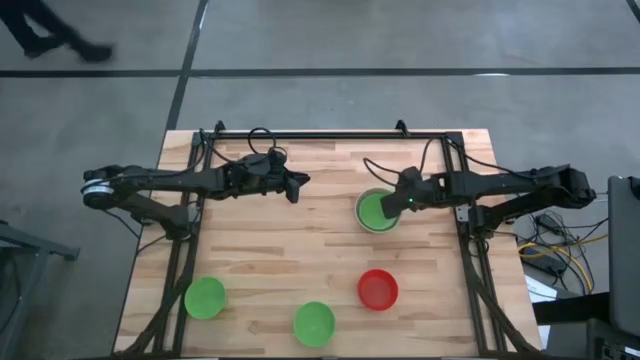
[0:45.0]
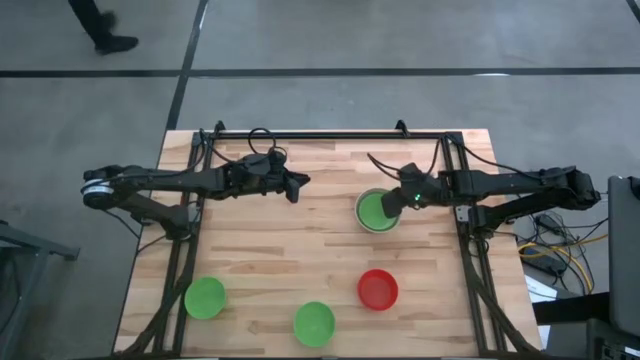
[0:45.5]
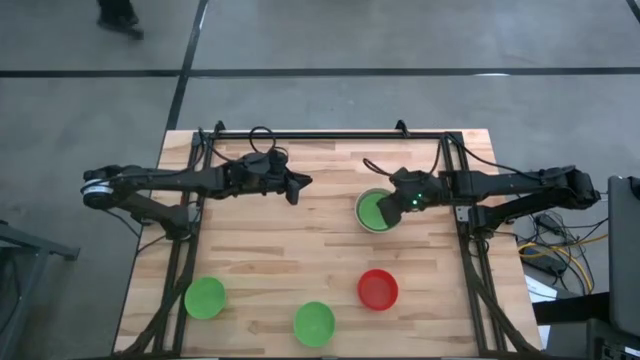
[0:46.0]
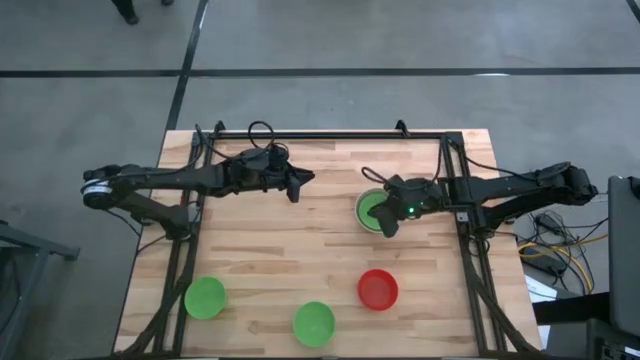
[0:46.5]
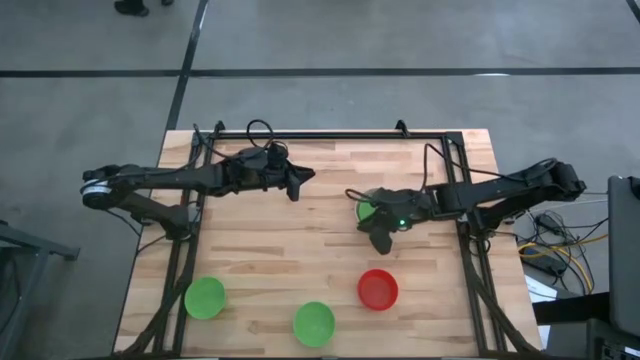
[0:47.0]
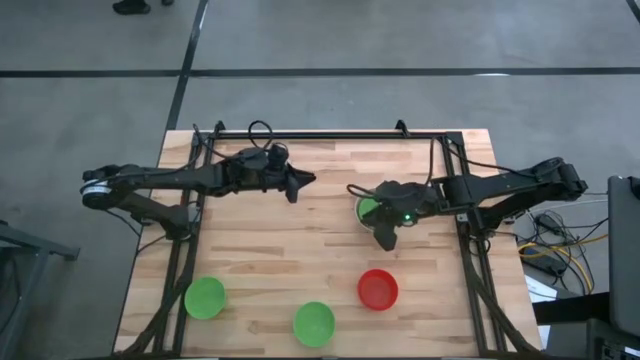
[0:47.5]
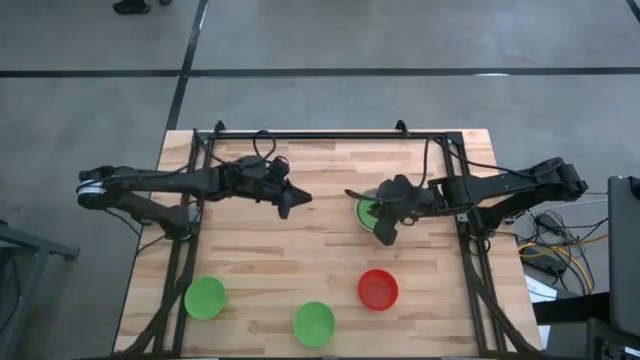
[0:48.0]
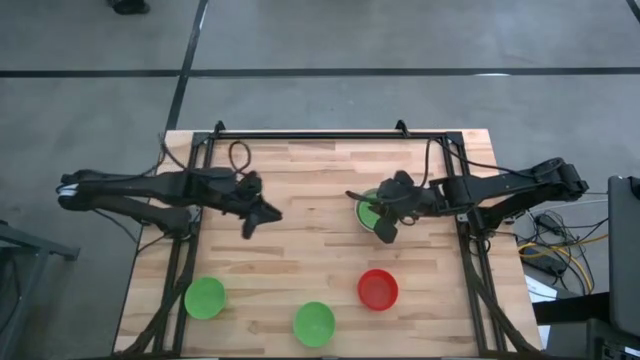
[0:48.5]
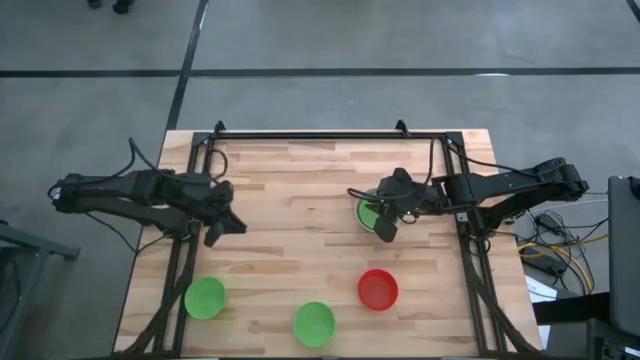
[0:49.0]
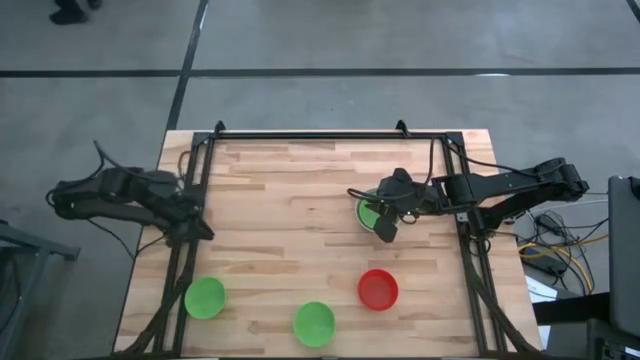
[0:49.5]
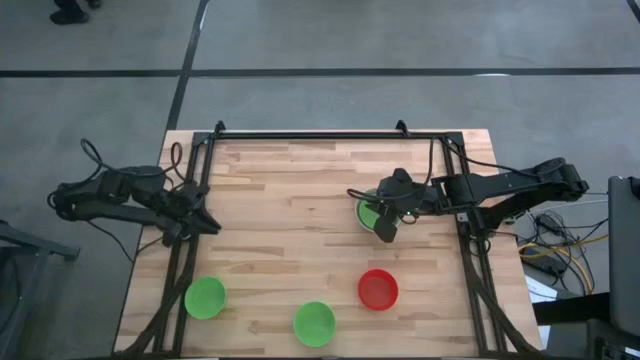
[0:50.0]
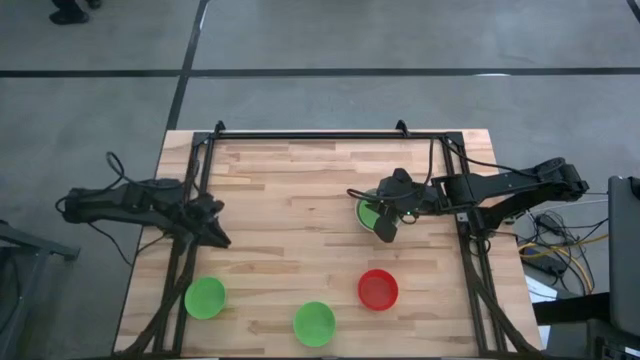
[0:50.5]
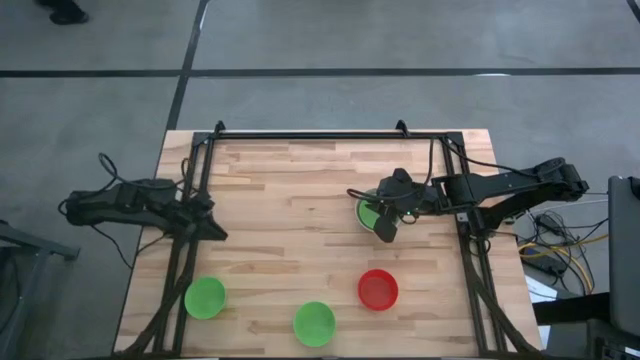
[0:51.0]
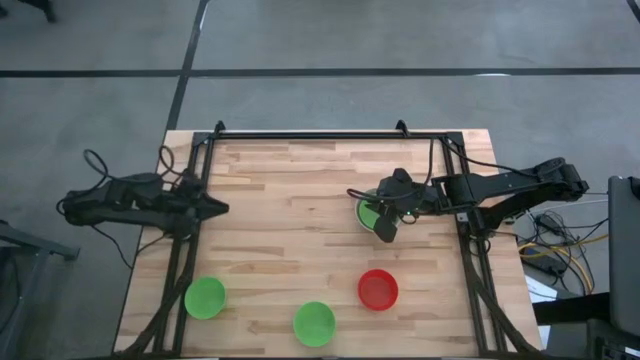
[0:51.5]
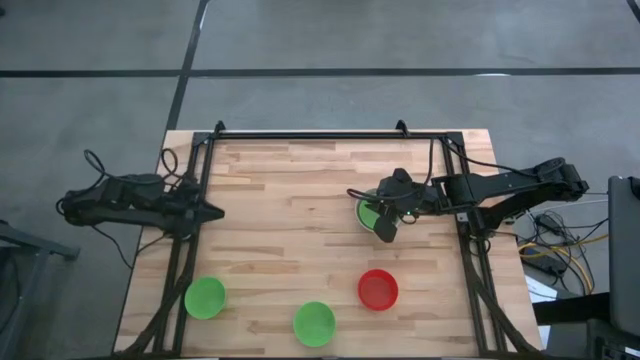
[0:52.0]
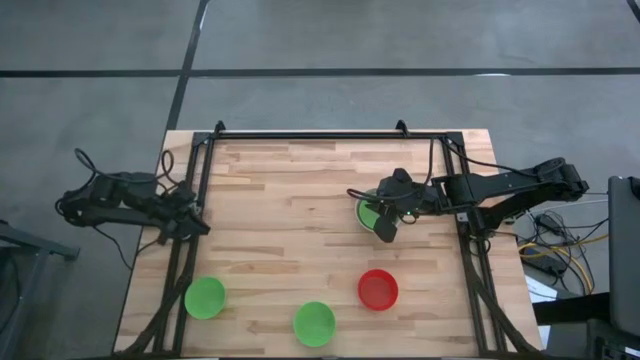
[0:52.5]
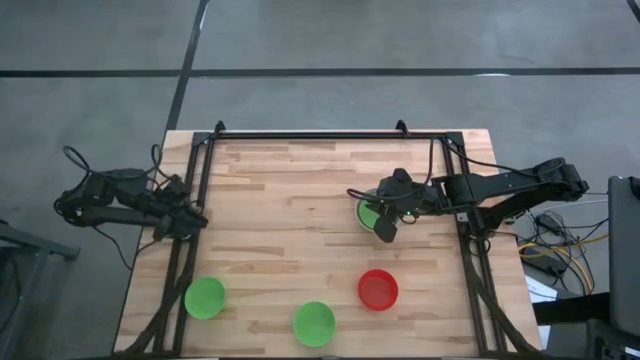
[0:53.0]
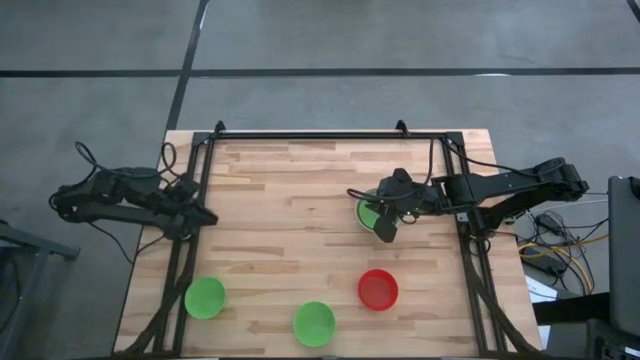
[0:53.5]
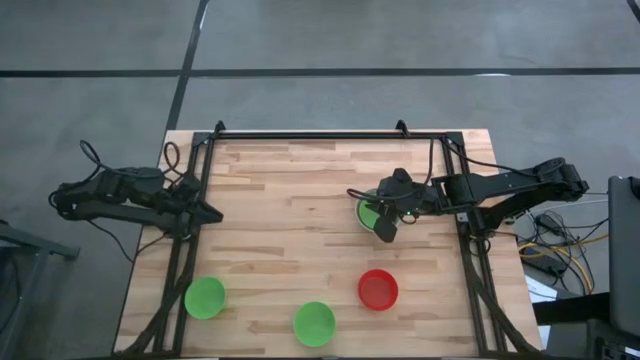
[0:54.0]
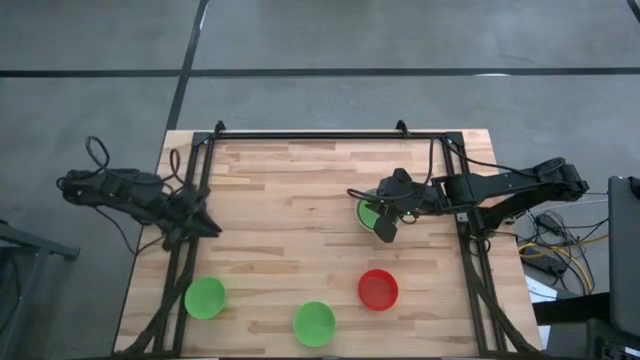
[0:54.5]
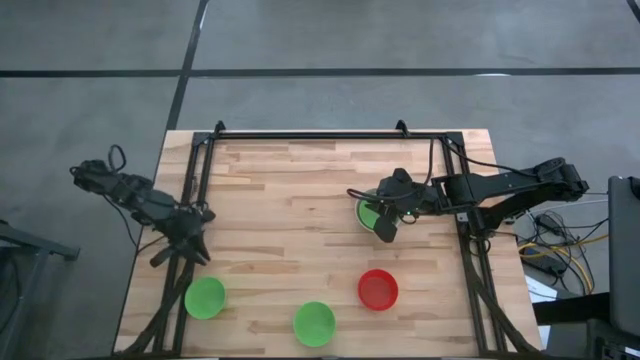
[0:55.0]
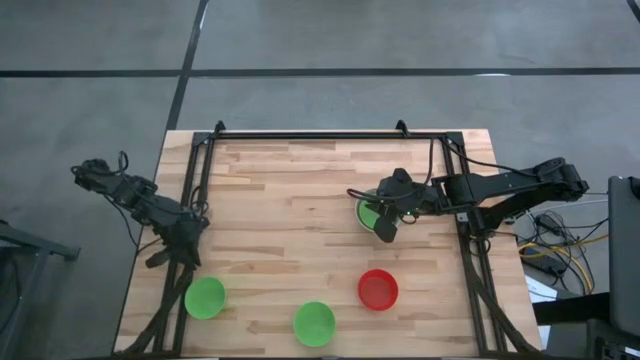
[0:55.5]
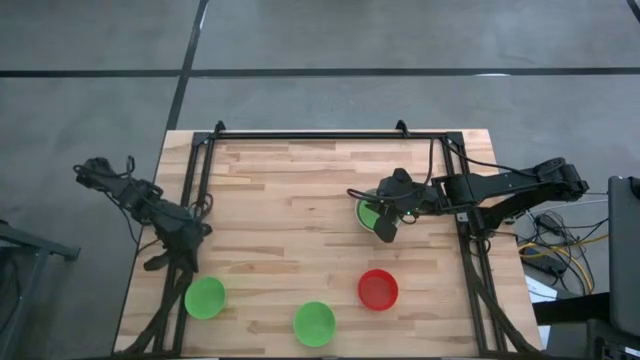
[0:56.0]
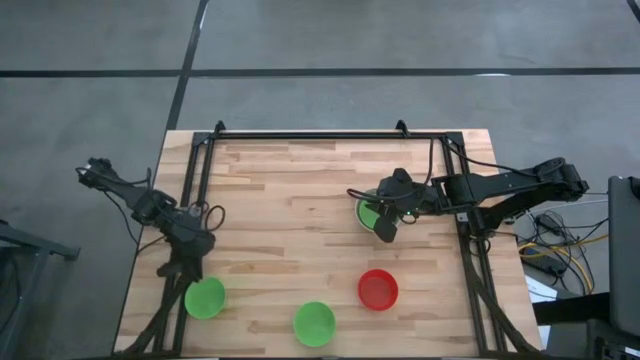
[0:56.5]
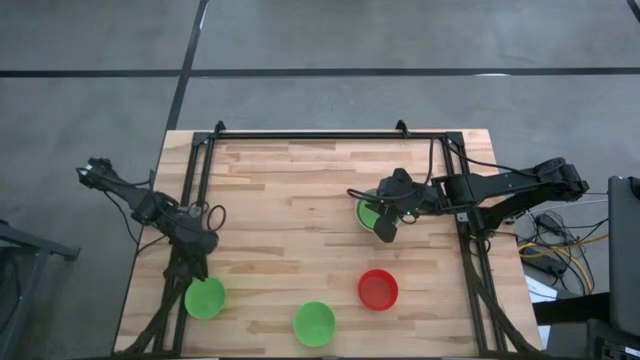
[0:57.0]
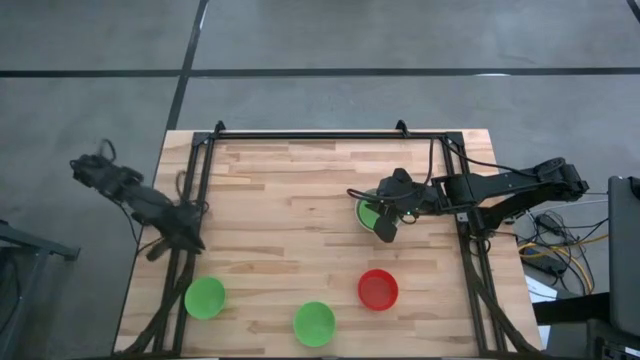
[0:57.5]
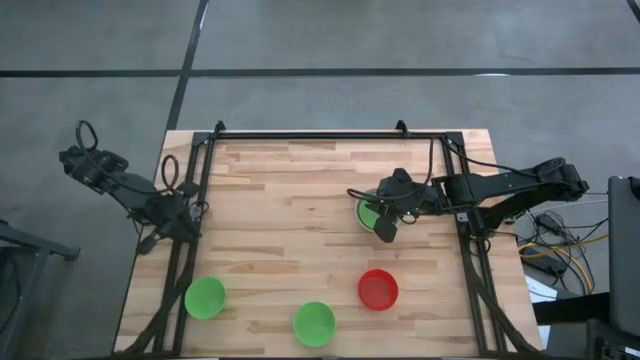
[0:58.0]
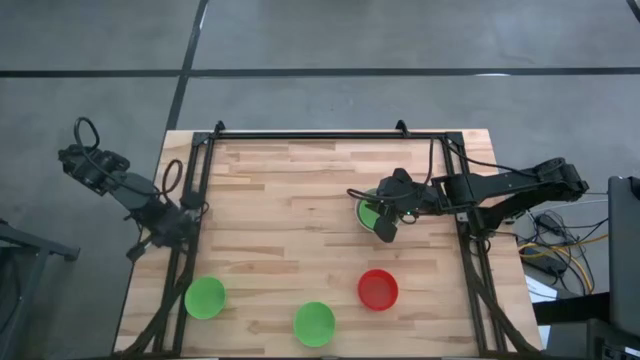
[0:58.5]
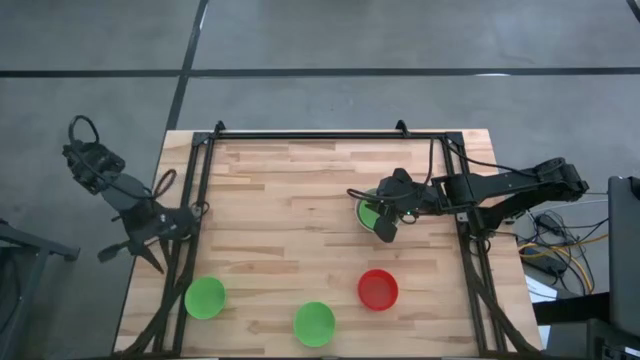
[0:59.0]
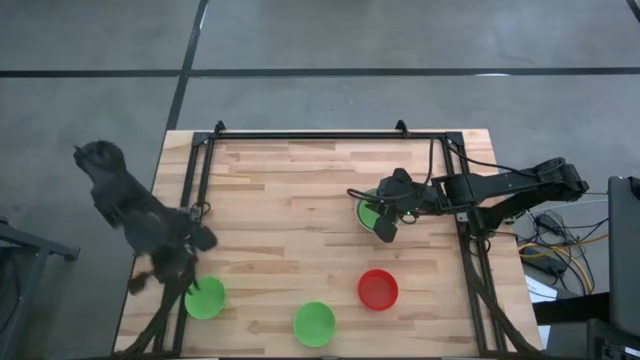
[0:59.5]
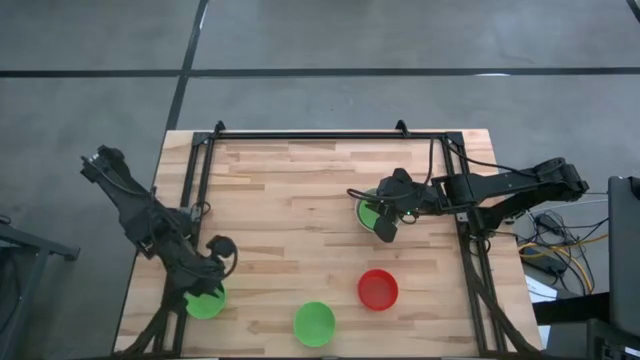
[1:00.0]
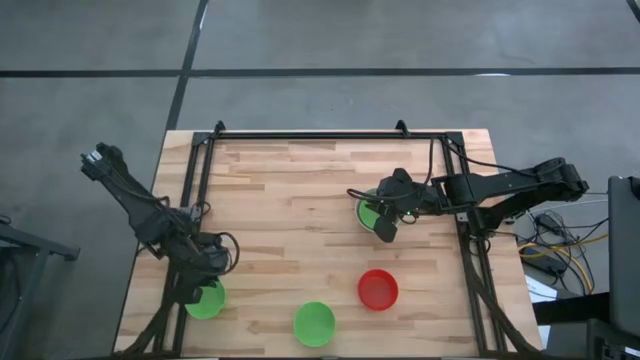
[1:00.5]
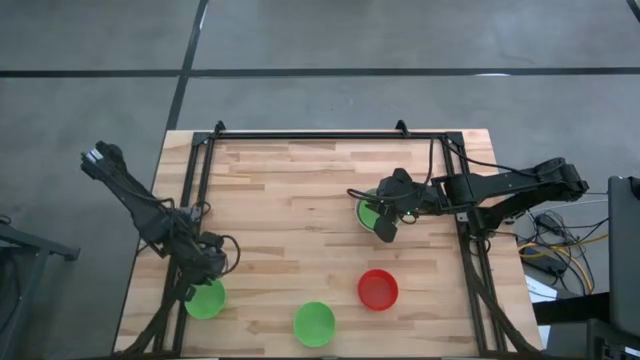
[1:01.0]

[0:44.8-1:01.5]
Stack the left green bowl on the green bowl
